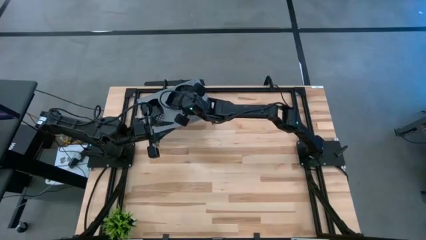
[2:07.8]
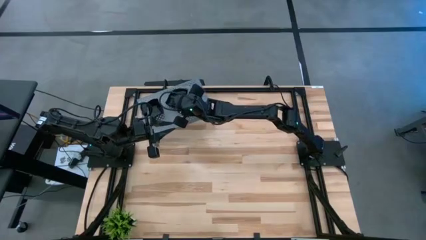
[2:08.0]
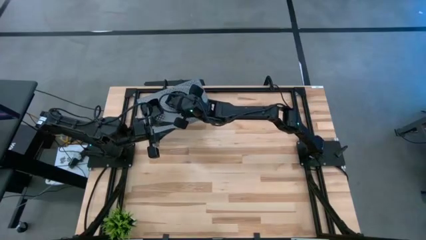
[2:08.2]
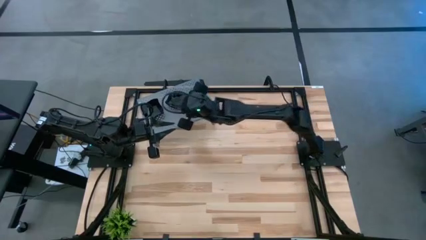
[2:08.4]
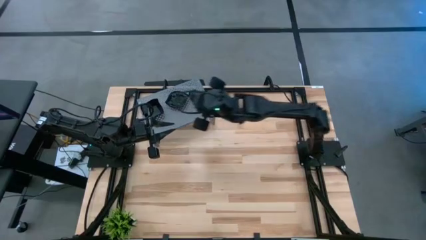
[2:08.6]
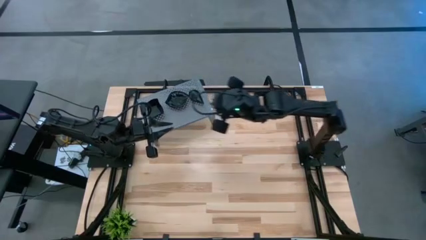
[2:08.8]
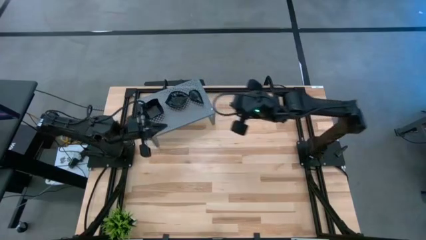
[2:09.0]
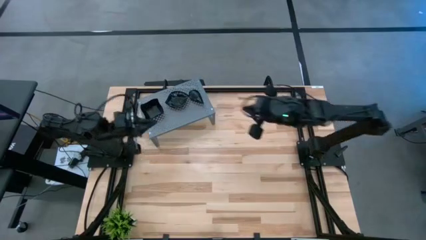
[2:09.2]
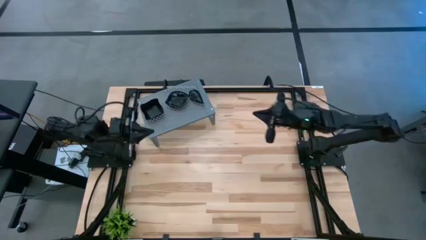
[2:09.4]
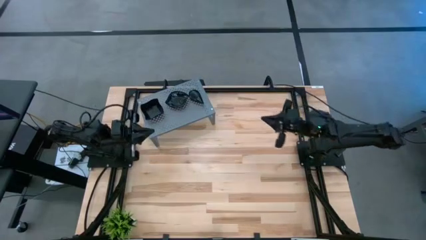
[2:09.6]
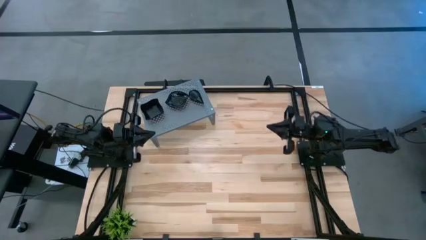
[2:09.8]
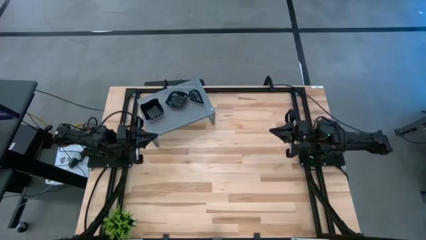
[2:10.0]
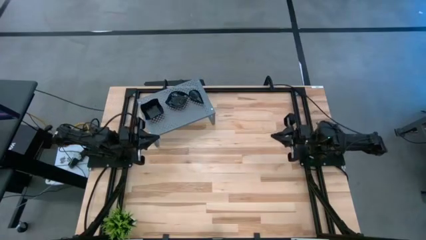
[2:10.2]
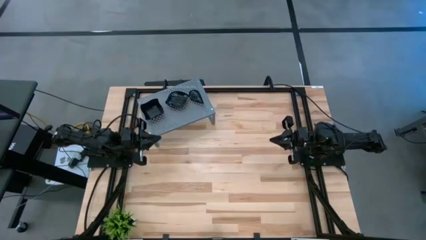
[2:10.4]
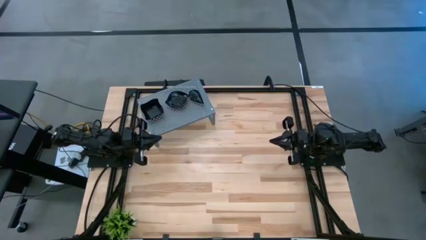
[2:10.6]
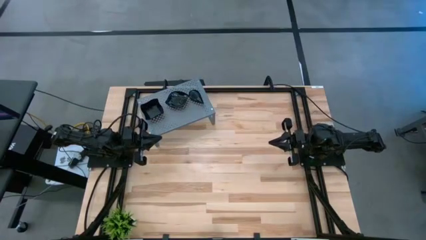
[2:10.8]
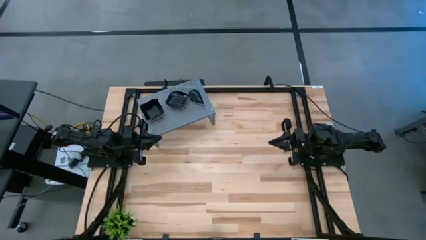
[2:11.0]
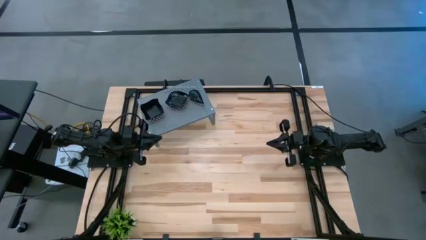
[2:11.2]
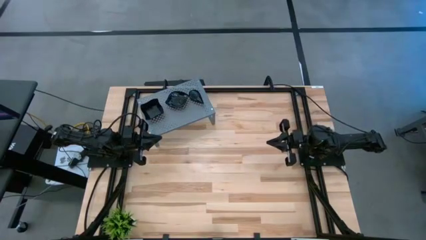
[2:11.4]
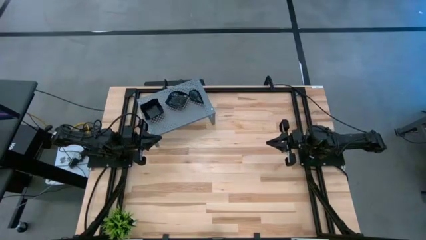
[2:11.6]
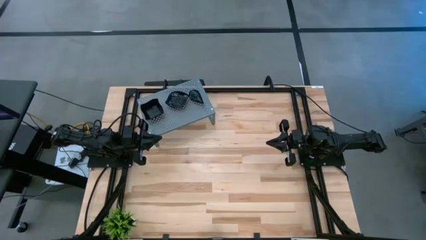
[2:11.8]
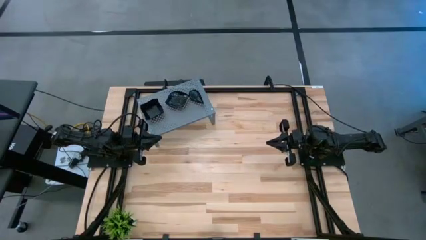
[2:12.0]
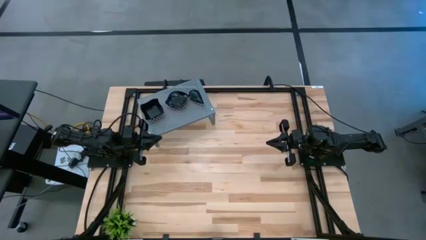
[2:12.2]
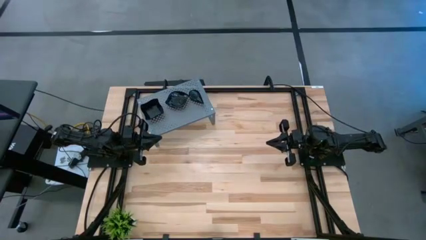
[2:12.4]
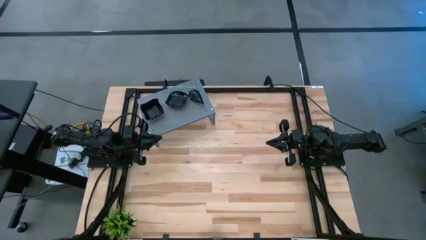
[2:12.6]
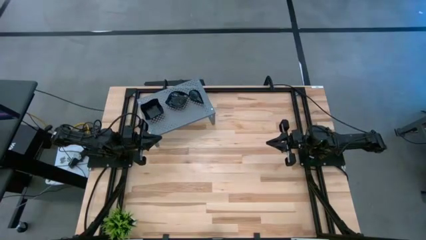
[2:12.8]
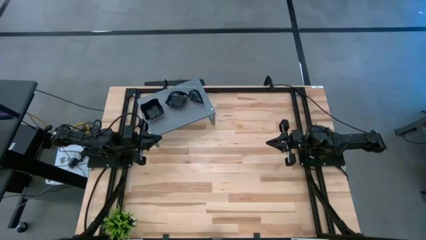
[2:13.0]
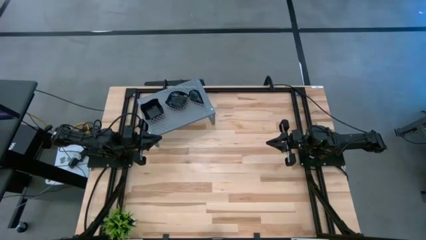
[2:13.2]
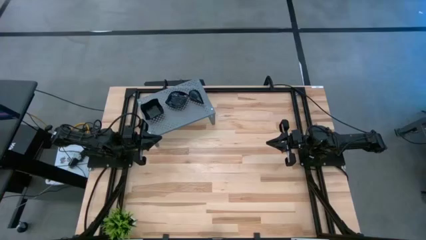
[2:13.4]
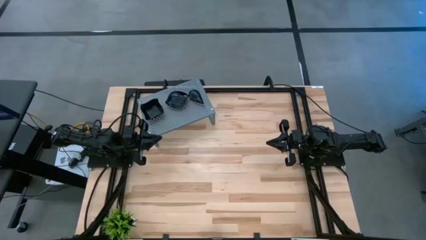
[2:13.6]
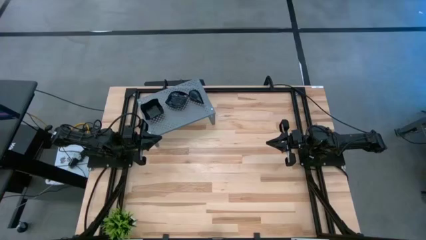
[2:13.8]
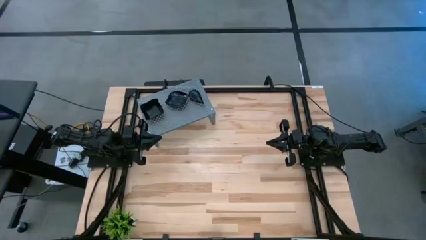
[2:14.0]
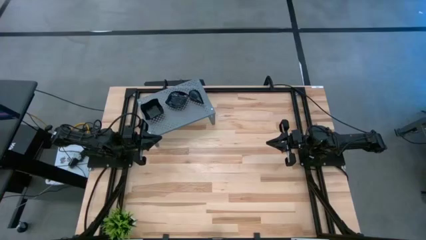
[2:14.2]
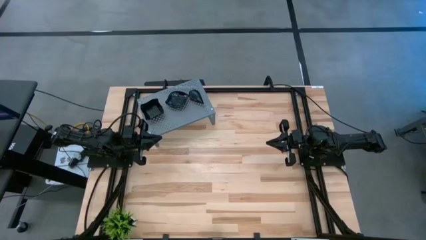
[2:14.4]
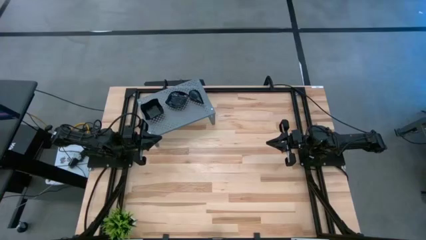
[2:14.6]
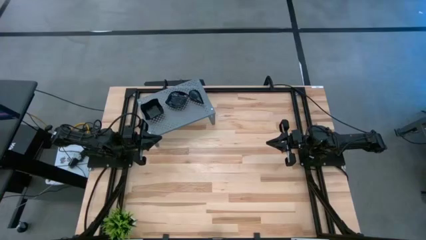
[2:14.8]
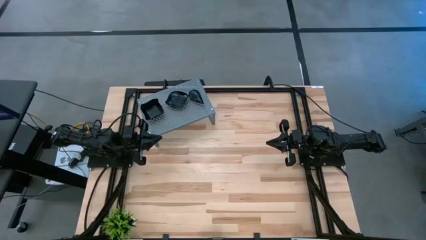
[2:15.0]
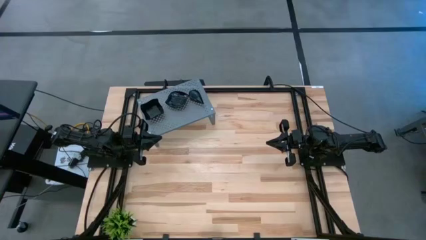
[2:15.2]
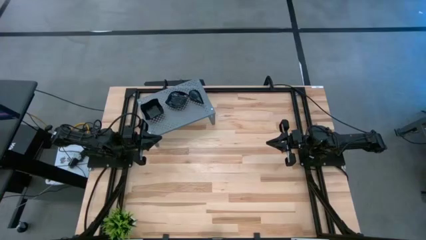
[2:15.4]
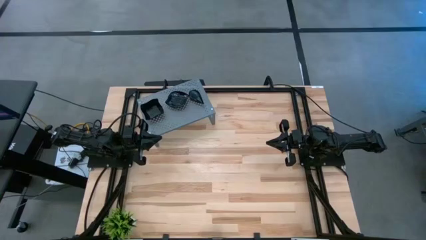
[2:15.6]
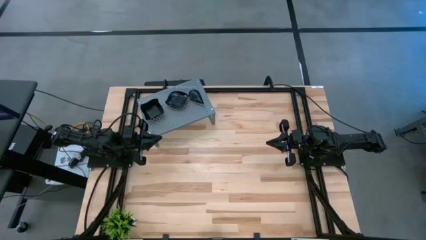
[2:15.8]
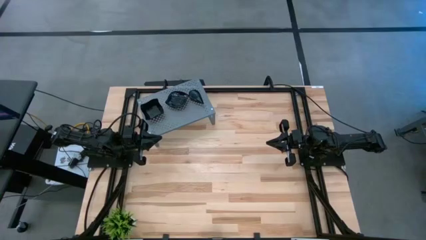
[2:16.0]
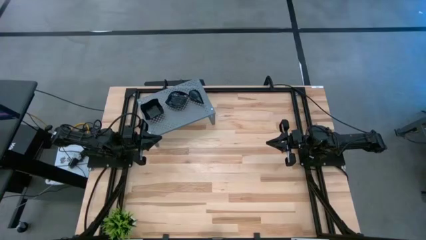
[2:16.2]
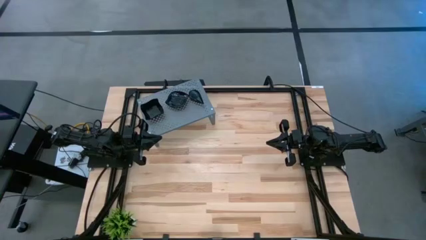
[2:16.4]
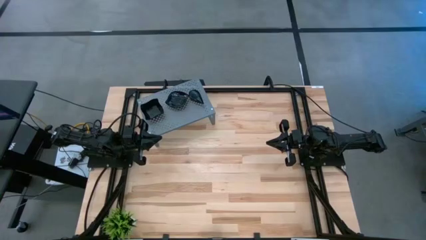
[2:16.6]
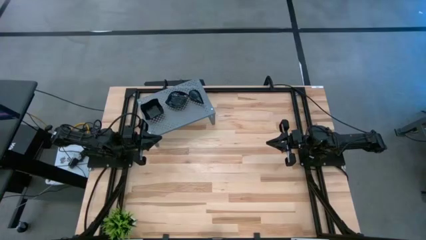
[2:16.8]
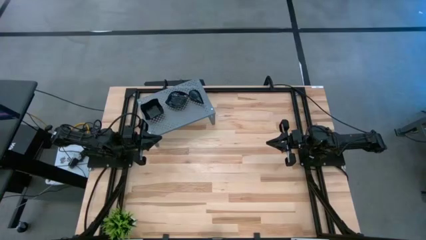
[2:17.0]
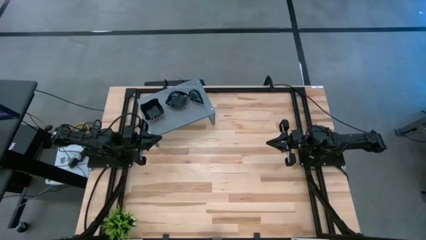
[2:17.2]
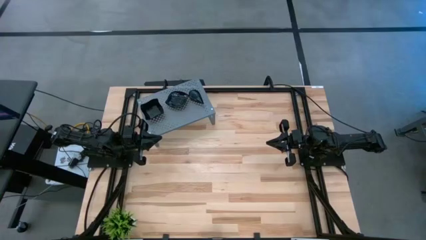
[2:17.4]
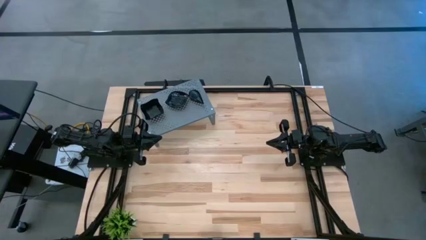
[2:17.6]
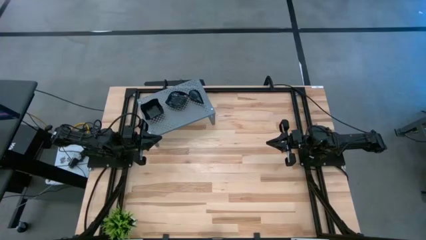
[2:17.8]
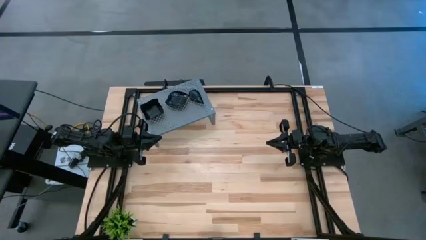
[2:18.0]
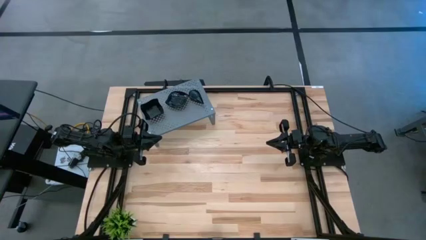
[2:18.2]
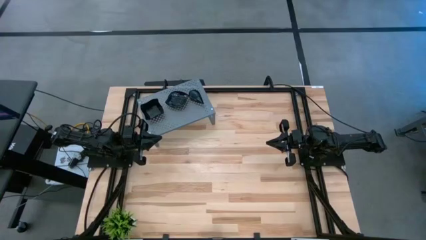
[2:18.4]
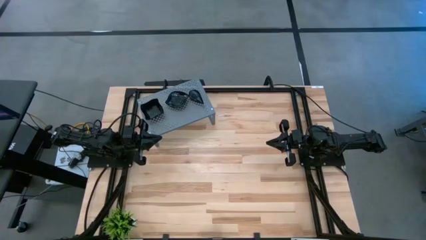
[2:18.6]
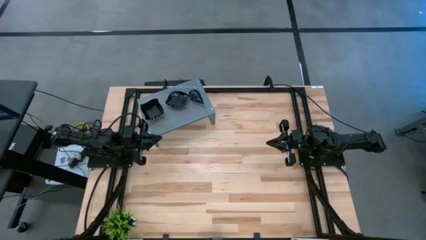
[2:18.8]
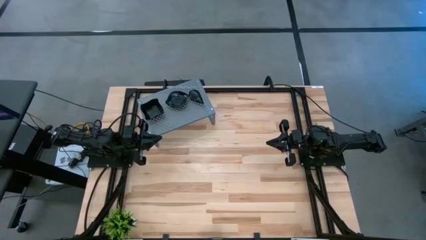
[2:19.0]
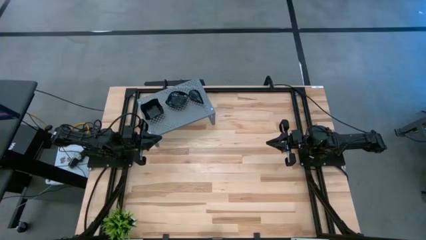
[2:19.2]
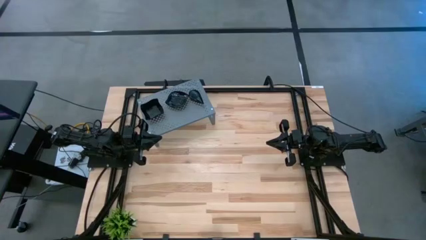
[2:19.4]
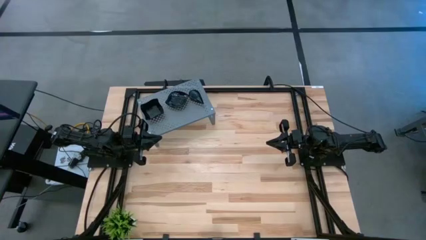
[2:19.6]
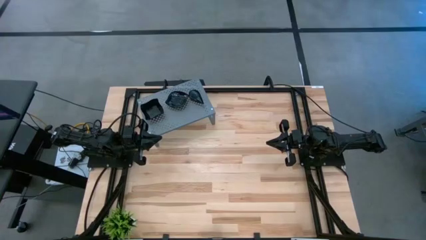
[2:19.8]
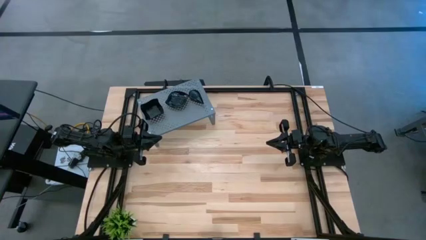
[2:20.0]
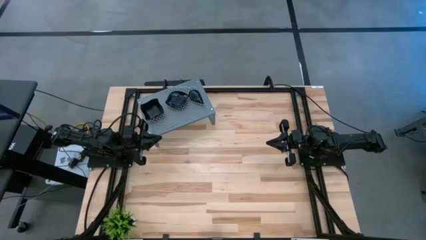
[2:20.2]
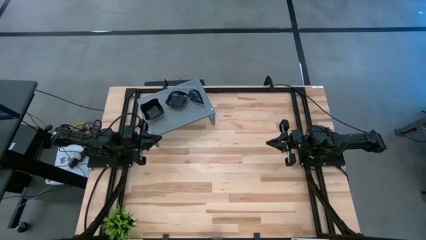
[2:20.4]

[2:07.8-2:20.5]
Task: Pick & Place Mini shaped plates
Return to Home Position
